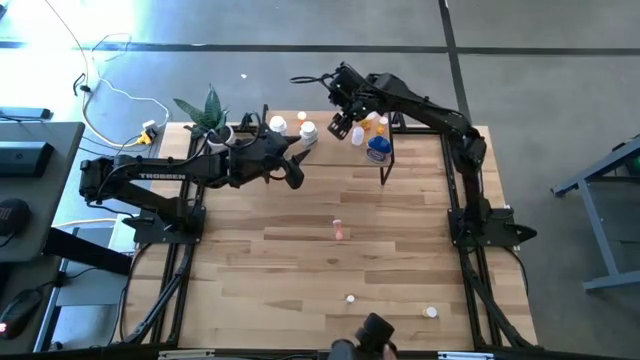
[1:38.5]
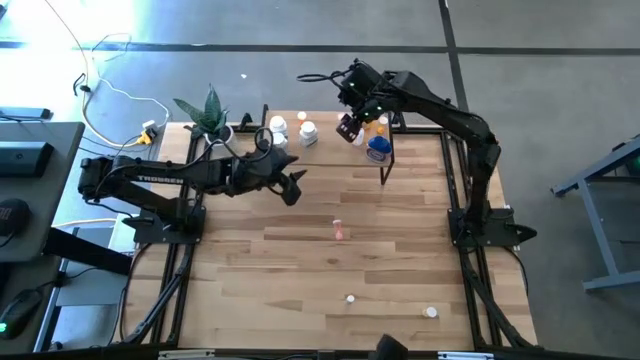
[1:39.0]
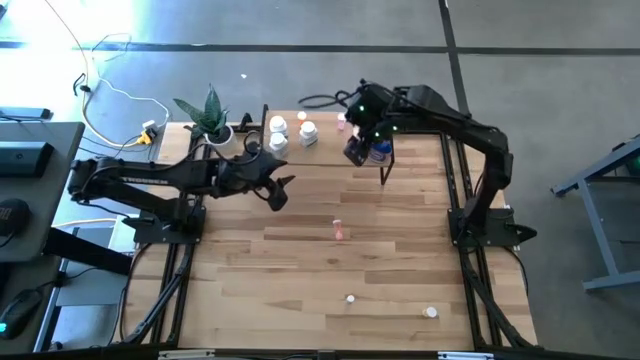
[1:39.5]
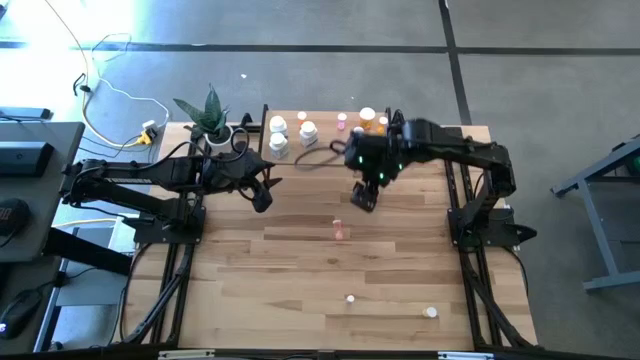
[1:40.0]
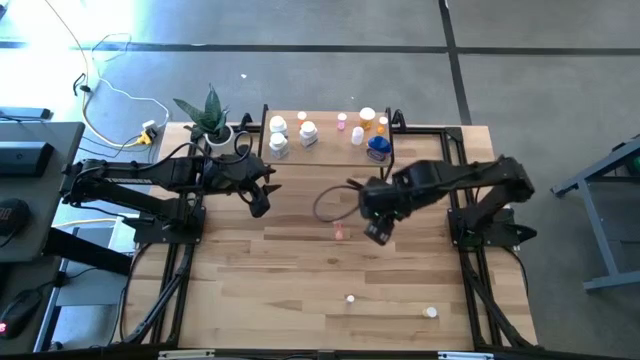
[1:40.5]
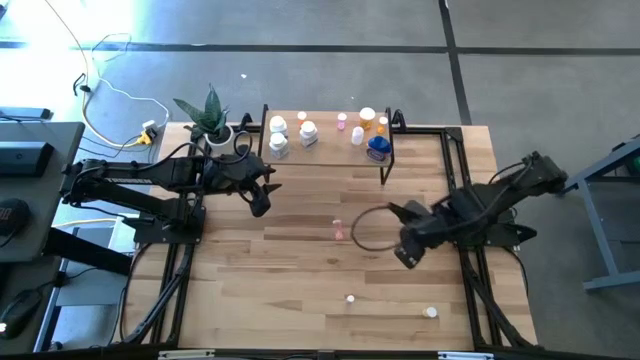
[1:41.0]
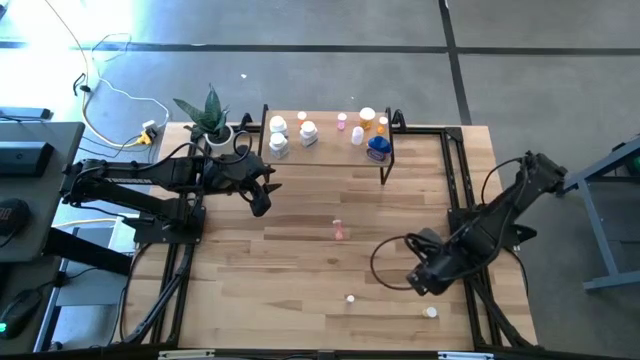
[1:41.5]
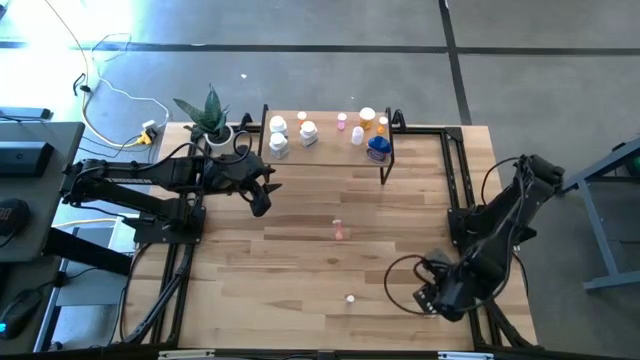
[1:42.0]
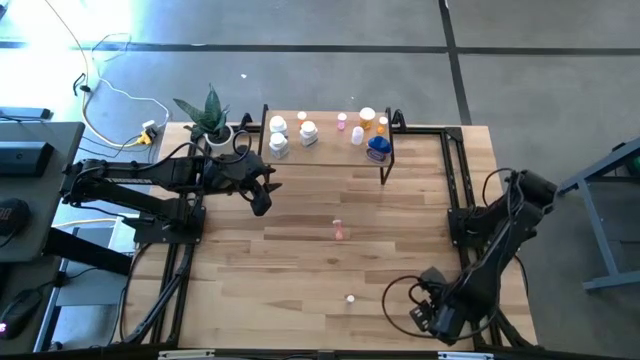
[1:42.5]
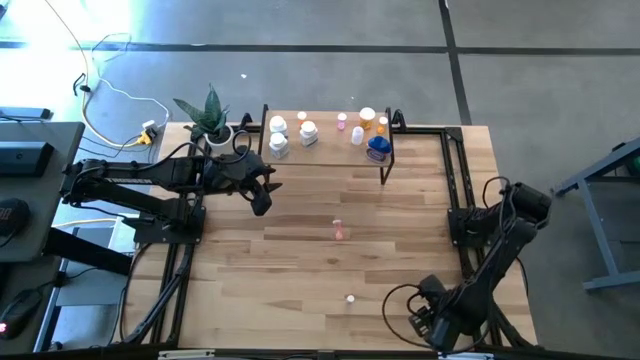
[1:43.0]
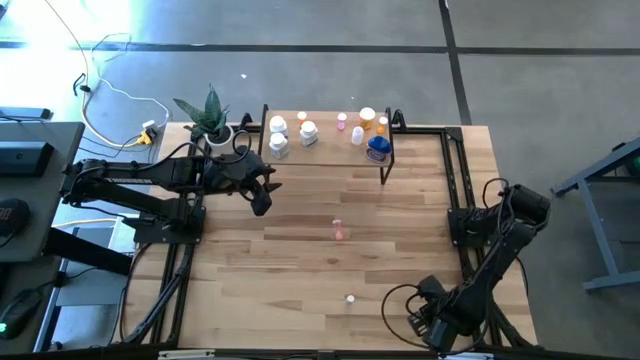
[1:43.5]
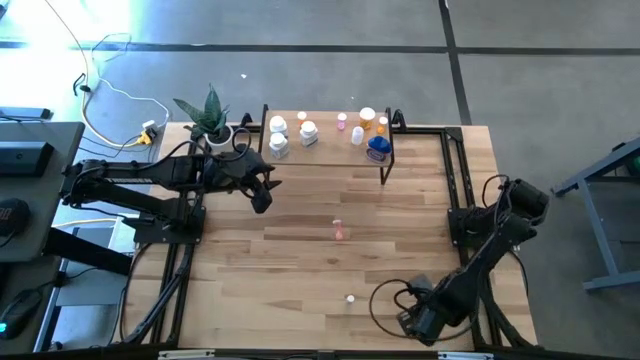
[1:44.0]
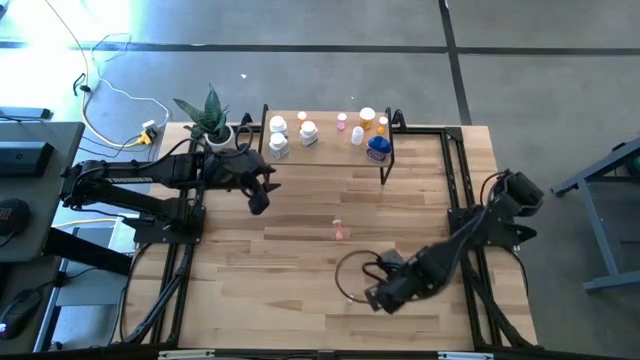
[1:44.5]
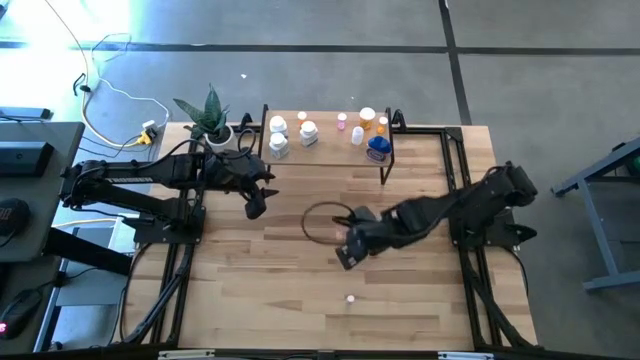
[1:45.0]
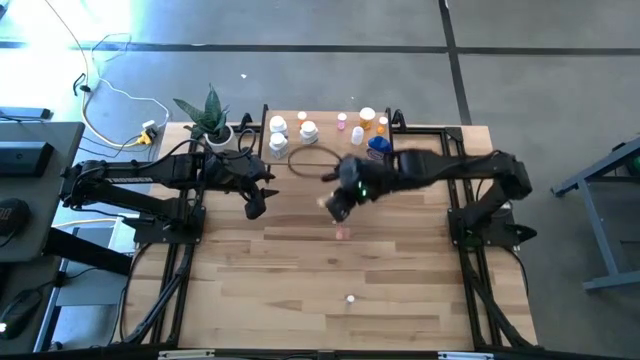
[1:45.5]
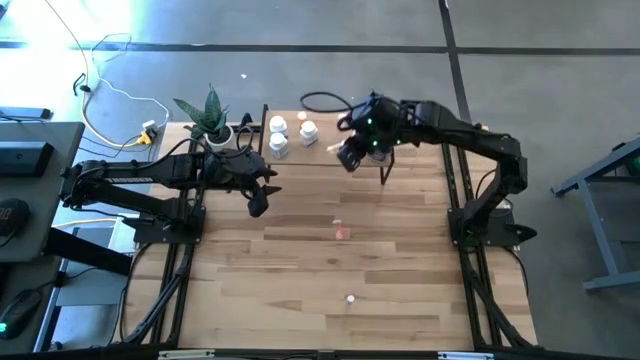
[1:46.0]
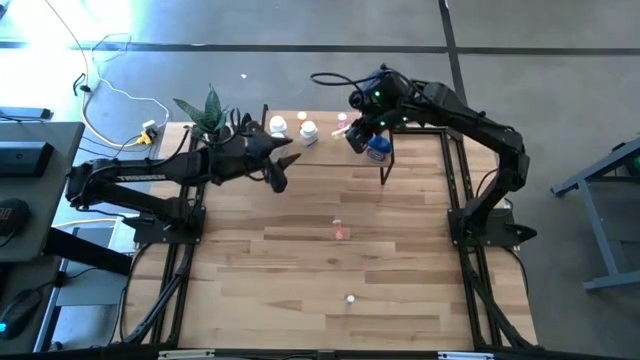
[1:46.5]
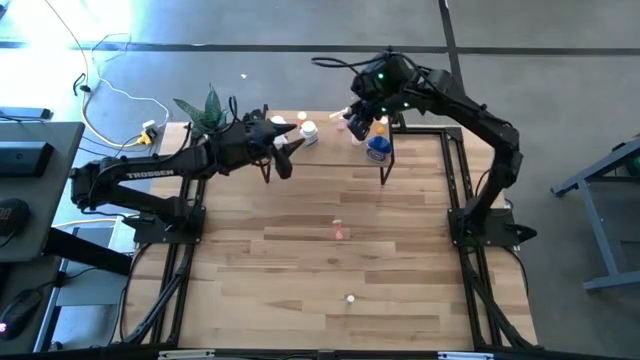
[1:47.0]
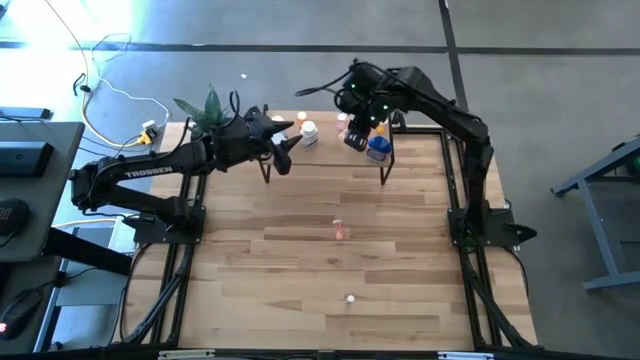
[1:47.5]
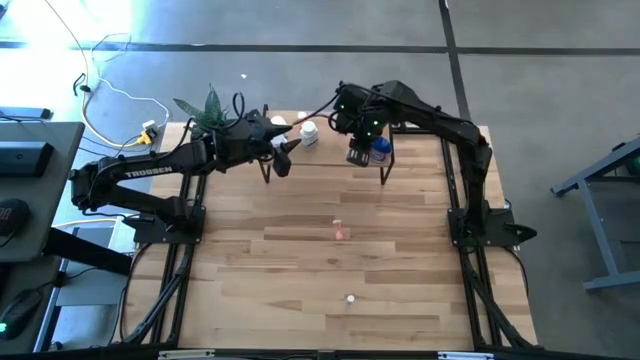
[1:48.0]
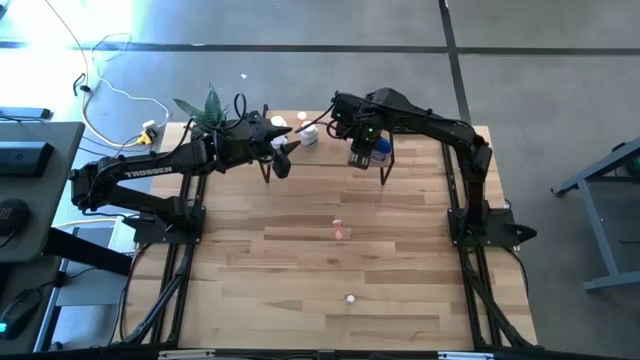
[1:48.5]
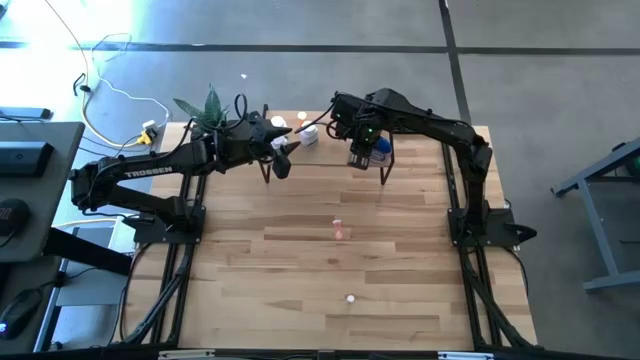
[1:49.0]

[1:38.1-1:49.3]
Task: Pick and place medicine bottles onto shelf by color
Put the yellow pill bottle on the shelf

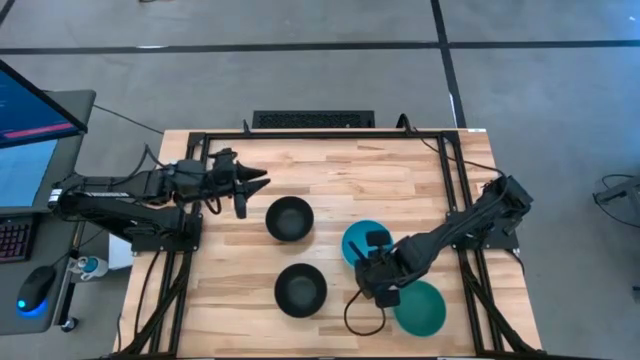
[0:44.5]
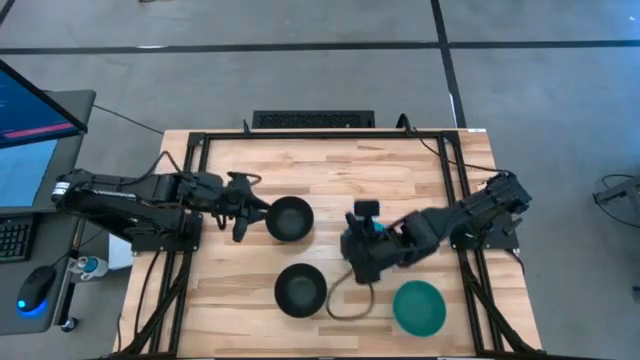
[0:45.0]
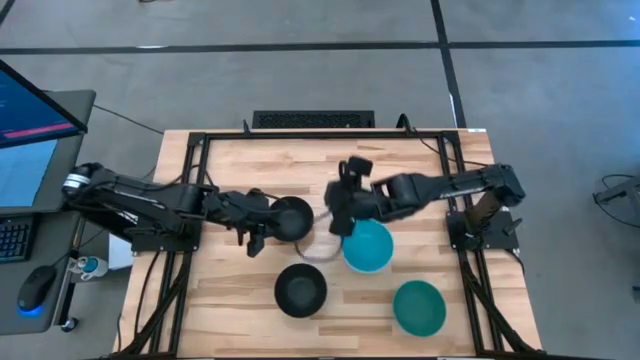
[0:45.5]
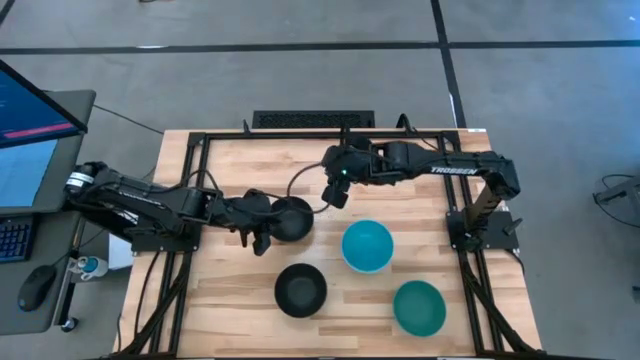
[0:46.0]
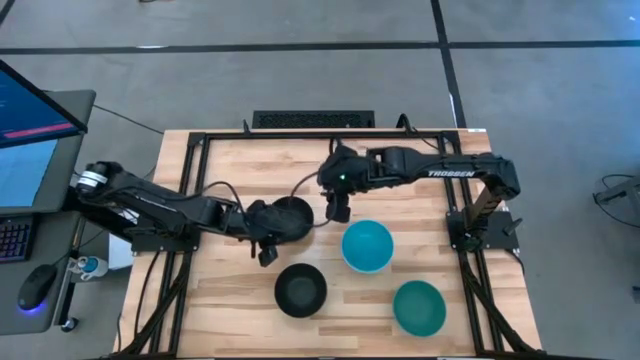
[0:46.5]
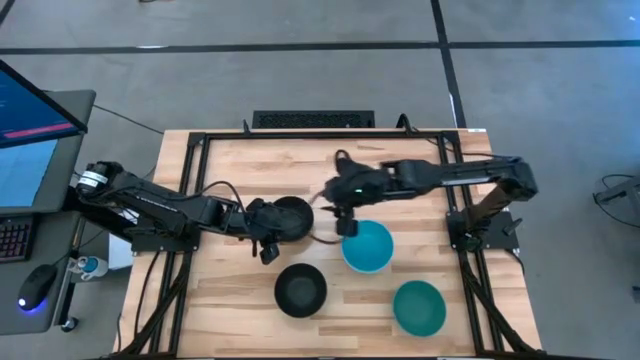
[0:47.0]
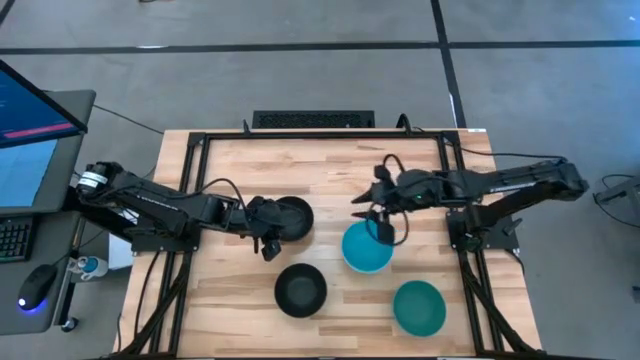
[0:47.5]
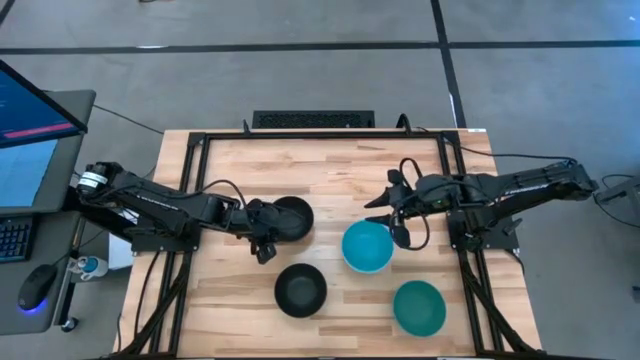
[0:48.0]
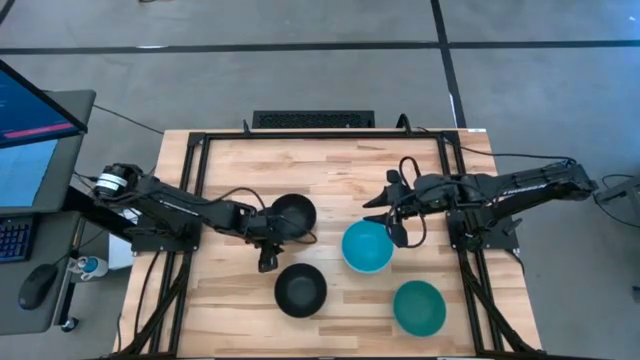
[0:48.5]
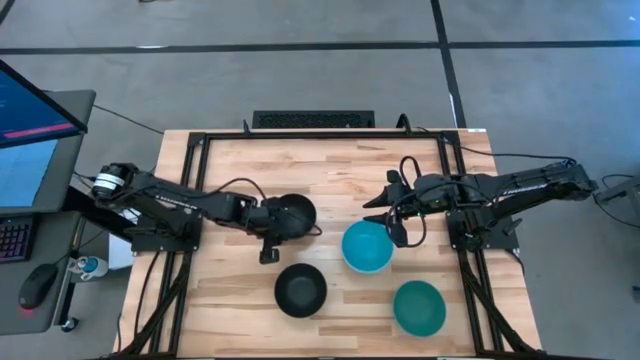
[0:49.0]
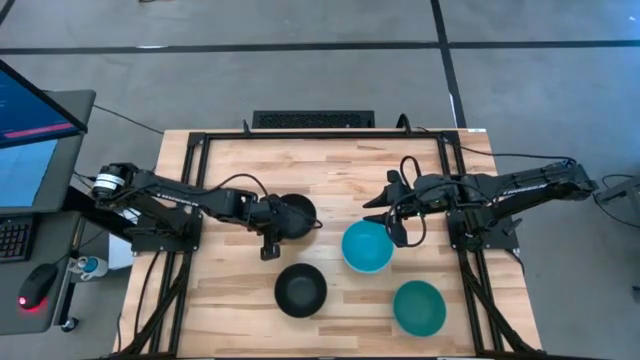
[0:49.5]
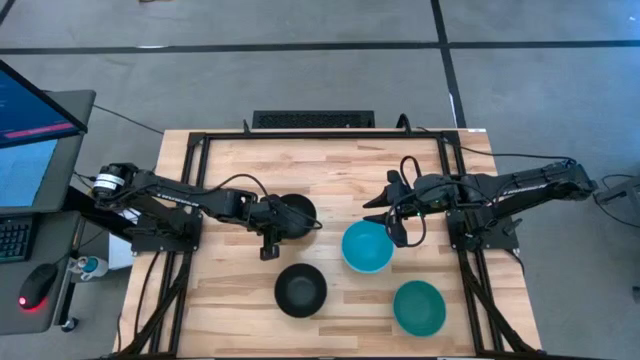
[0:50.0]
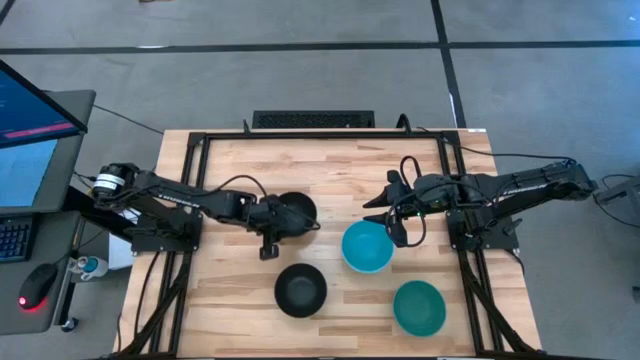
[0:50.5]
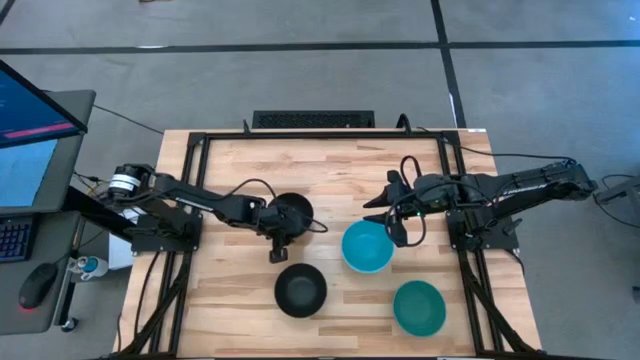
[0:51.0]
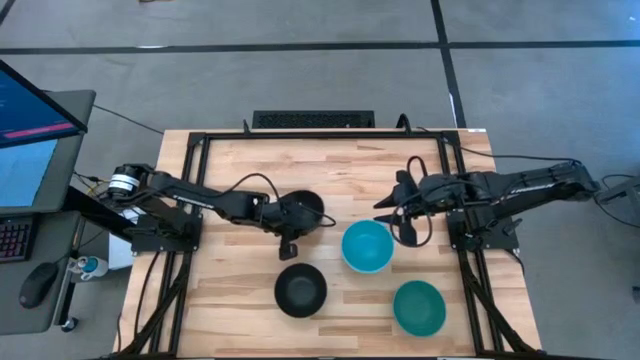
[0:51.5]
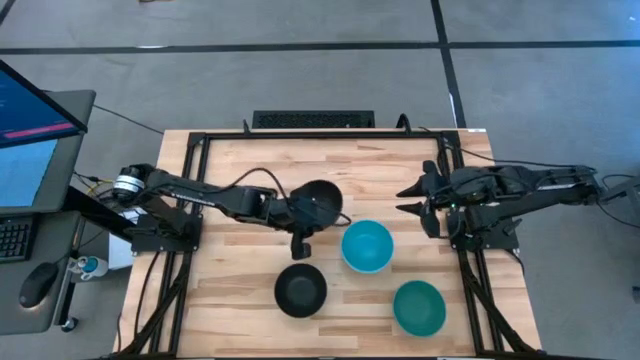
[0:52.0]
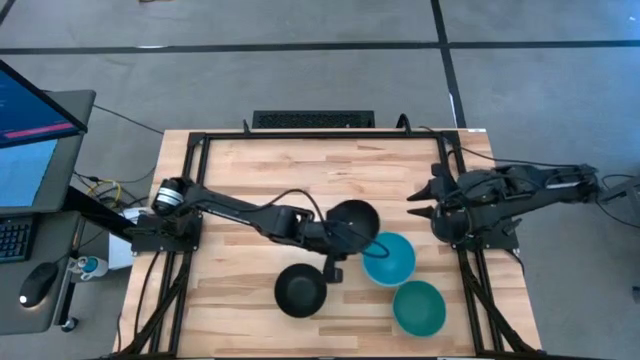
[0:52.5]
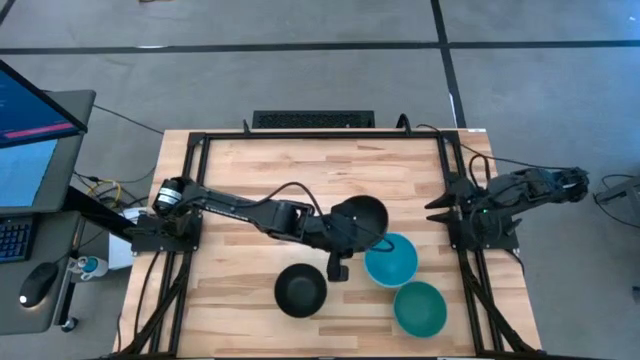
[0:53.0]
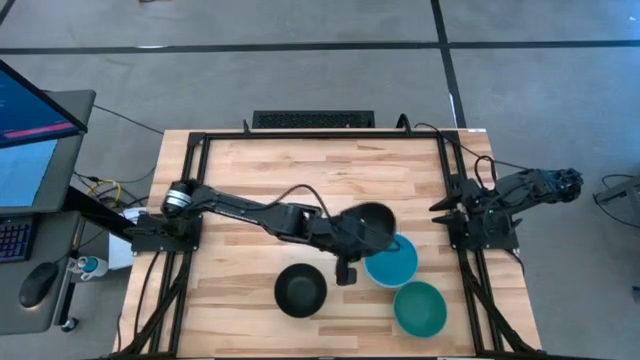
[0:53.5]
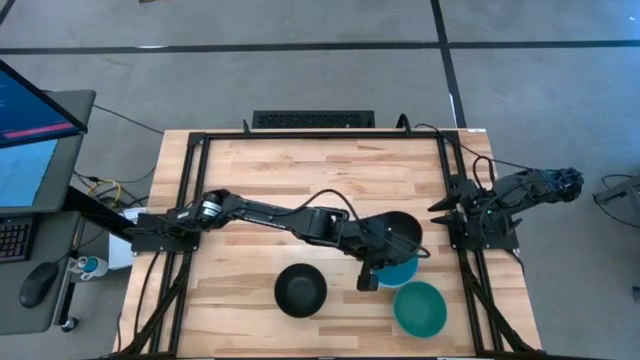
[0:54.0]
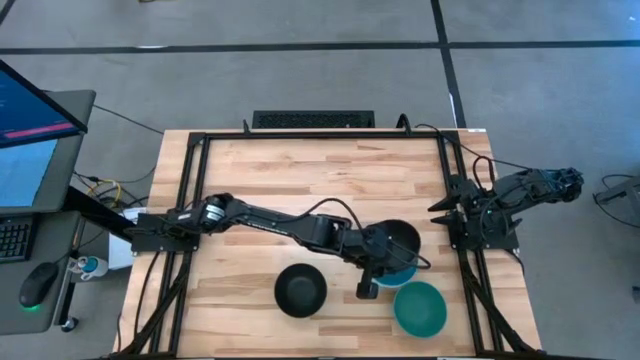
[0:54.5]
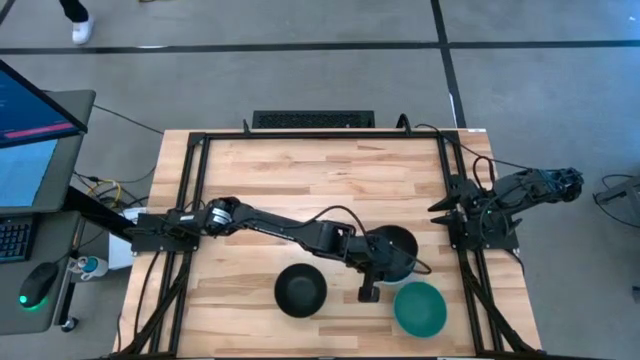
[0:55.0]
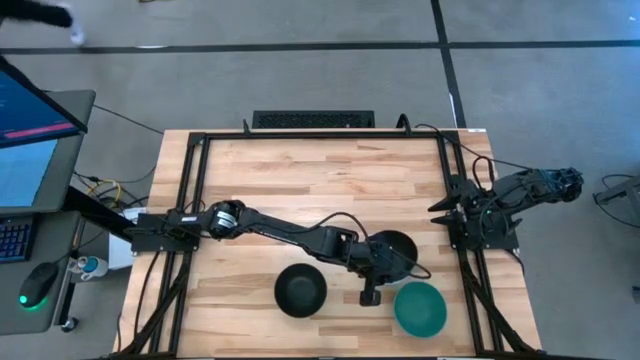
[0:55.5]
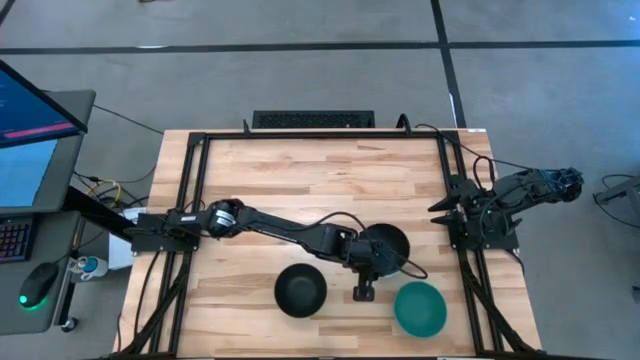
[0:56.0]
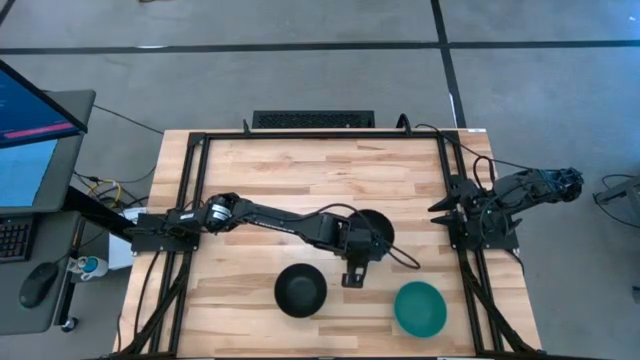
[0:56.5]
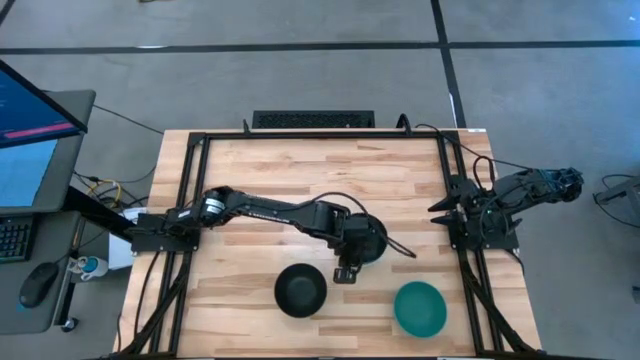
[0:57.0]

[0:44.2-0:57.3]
Task: Nest bowls inside each other
Stack the top black bowl on top of the blue bowl
